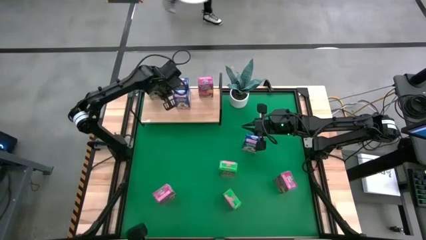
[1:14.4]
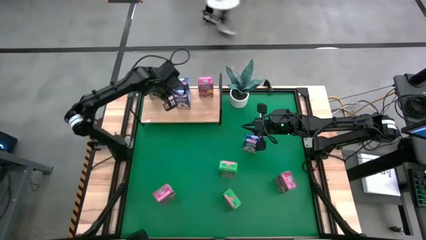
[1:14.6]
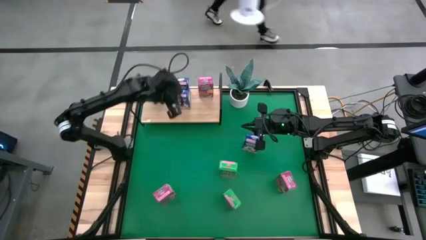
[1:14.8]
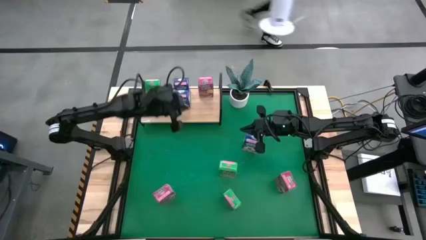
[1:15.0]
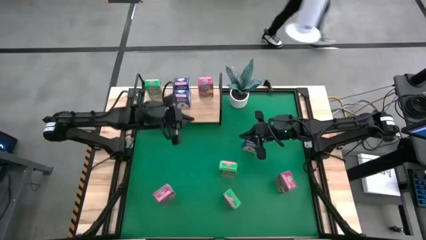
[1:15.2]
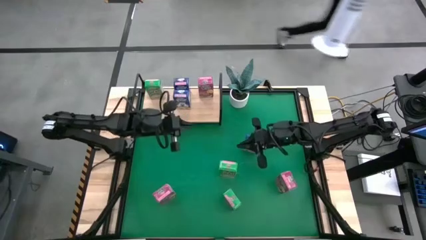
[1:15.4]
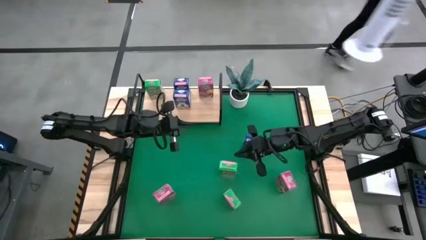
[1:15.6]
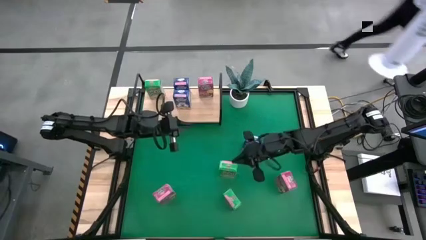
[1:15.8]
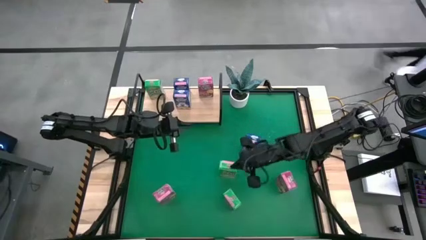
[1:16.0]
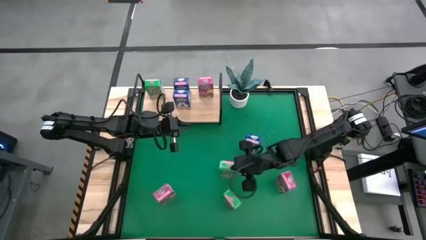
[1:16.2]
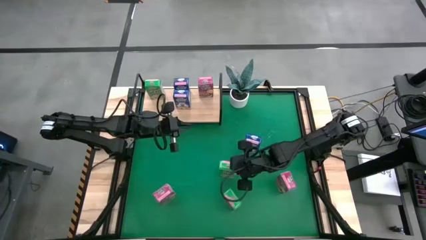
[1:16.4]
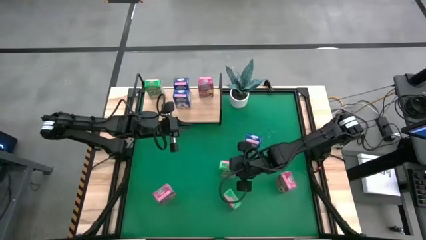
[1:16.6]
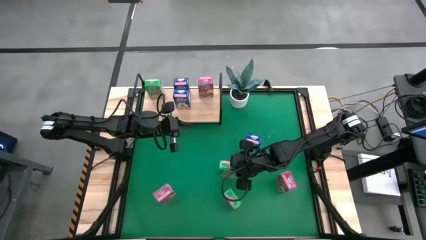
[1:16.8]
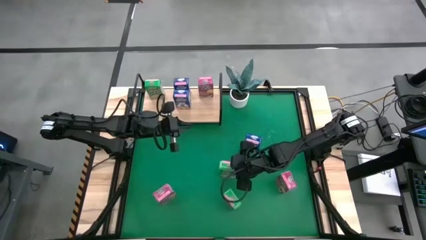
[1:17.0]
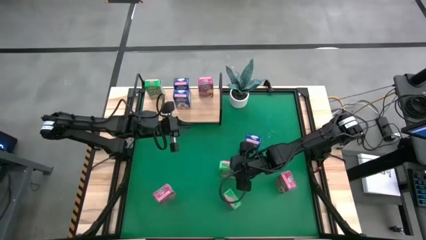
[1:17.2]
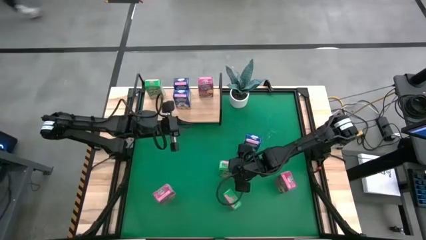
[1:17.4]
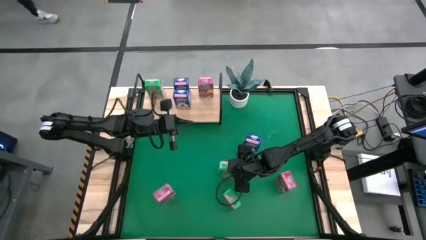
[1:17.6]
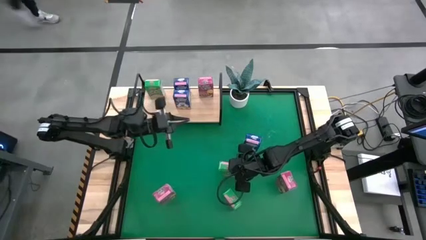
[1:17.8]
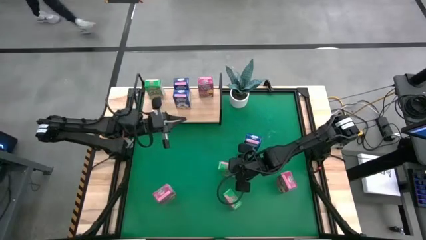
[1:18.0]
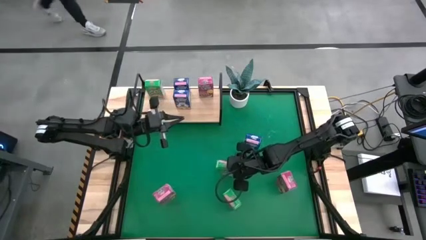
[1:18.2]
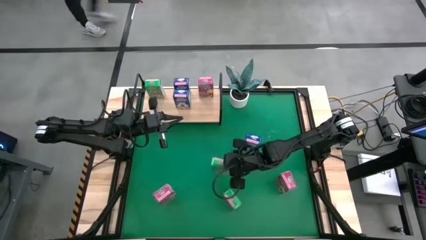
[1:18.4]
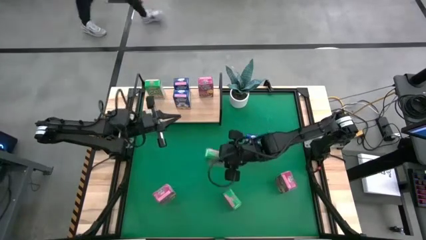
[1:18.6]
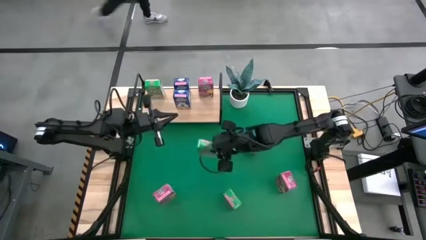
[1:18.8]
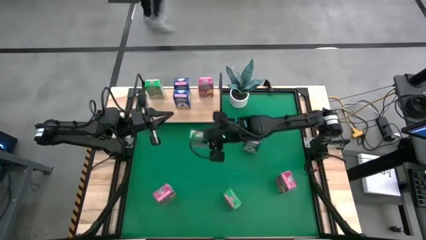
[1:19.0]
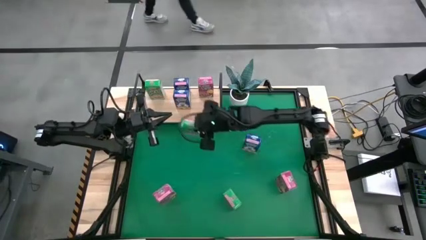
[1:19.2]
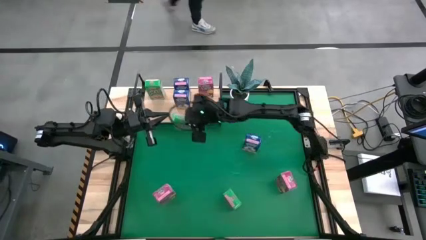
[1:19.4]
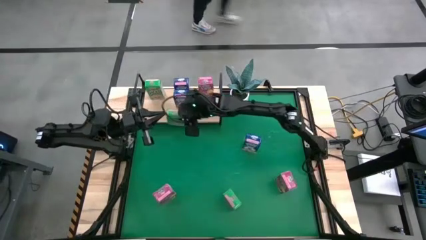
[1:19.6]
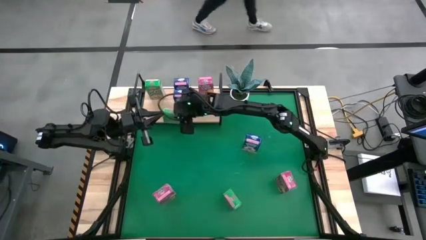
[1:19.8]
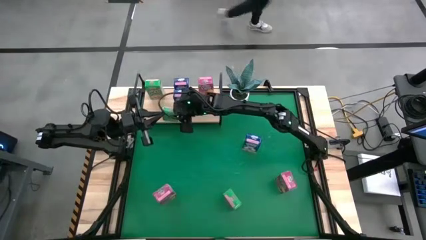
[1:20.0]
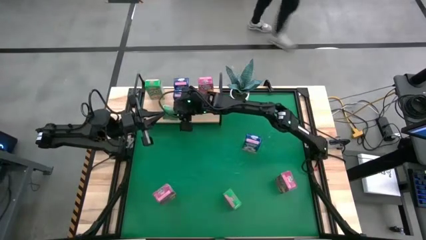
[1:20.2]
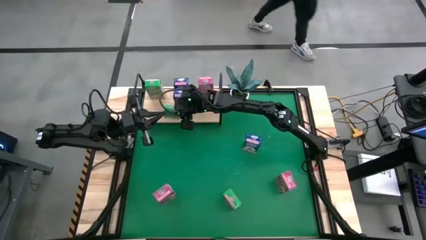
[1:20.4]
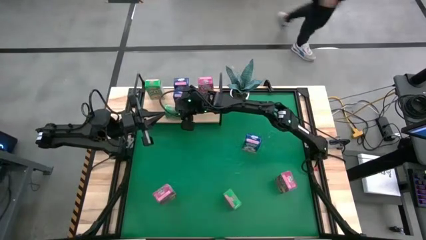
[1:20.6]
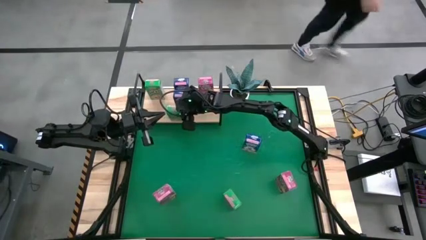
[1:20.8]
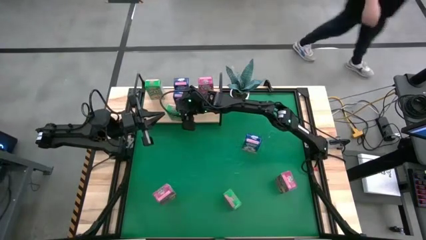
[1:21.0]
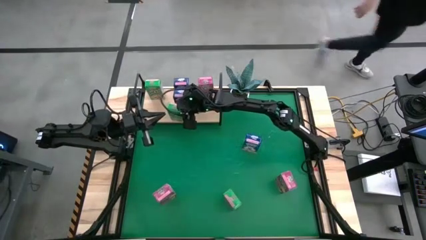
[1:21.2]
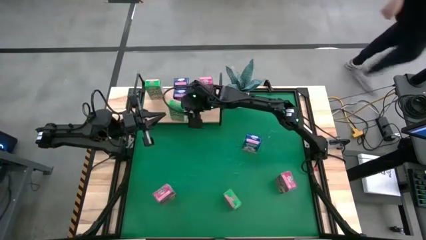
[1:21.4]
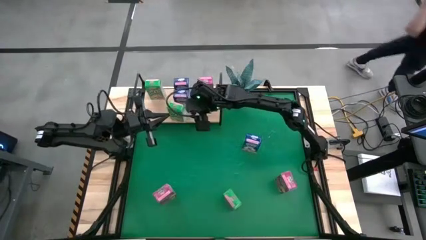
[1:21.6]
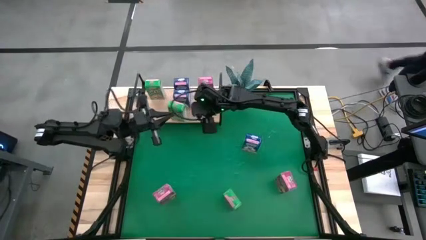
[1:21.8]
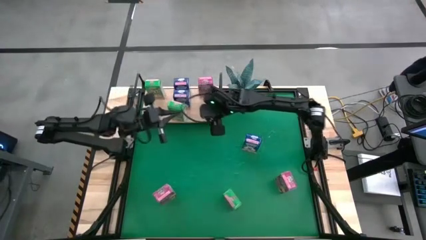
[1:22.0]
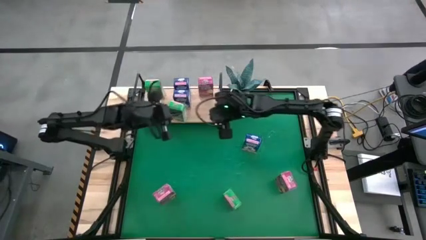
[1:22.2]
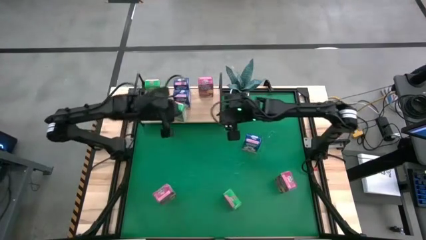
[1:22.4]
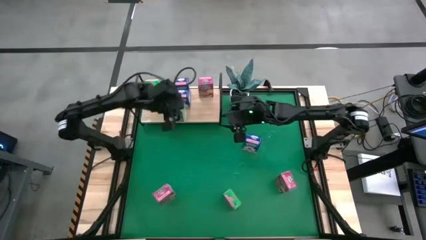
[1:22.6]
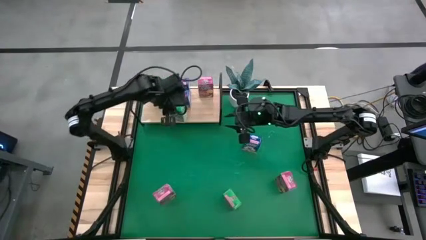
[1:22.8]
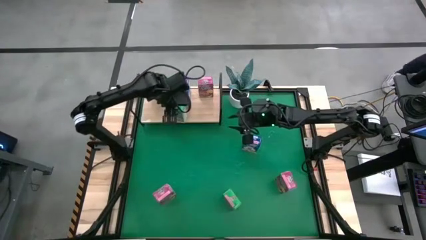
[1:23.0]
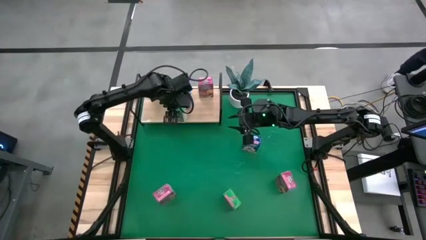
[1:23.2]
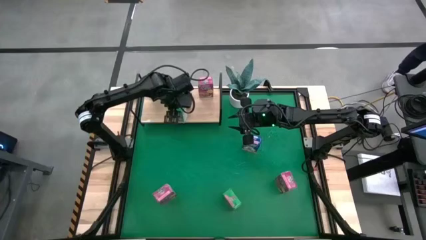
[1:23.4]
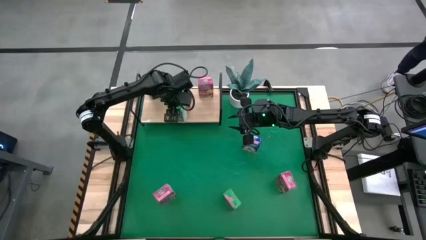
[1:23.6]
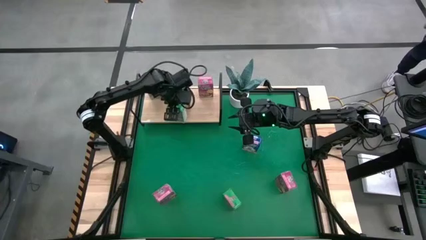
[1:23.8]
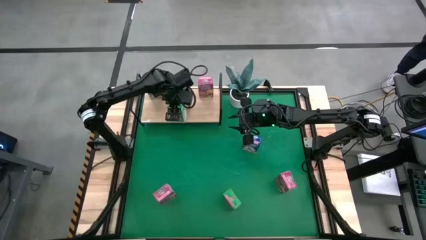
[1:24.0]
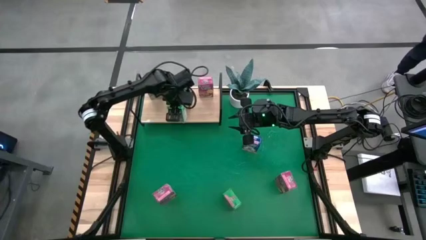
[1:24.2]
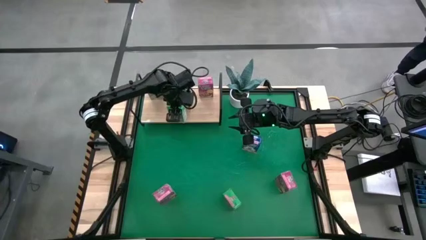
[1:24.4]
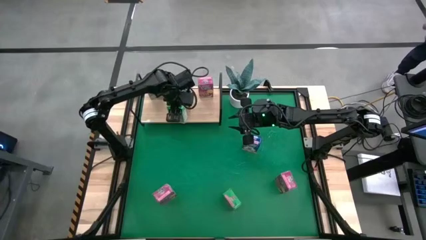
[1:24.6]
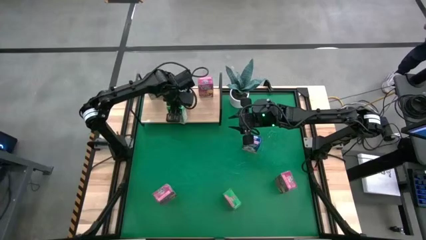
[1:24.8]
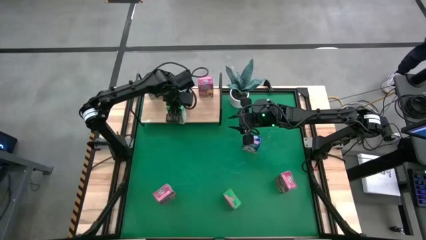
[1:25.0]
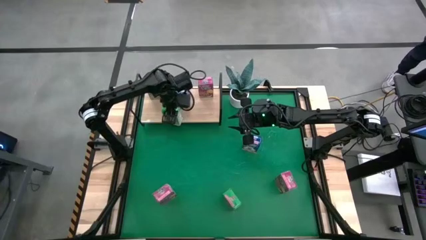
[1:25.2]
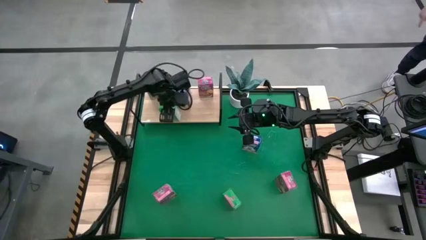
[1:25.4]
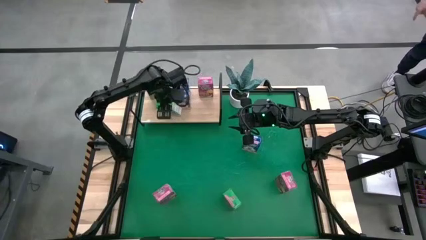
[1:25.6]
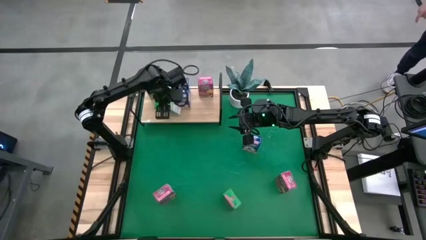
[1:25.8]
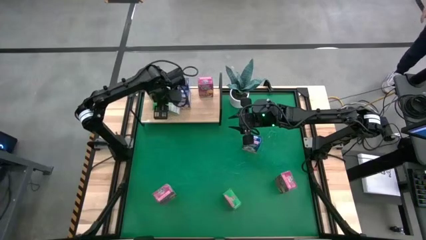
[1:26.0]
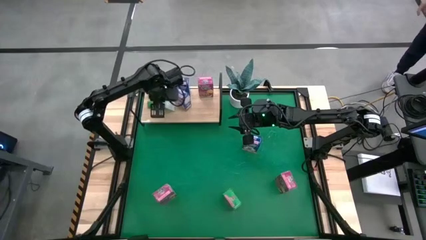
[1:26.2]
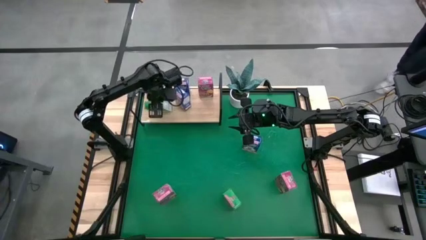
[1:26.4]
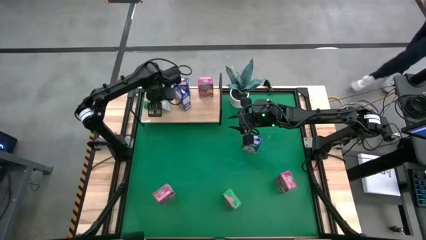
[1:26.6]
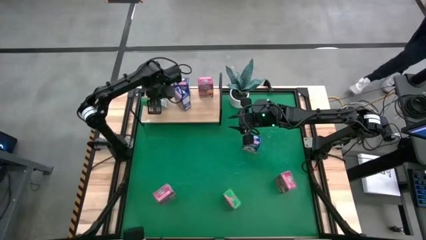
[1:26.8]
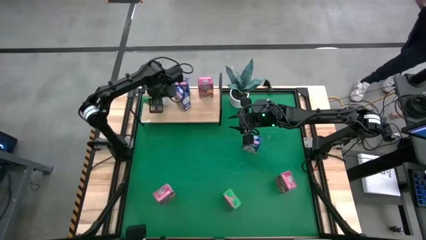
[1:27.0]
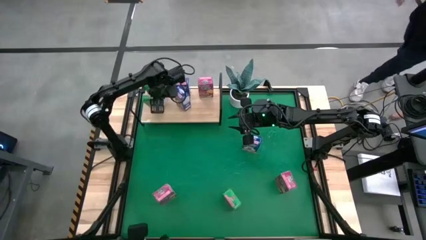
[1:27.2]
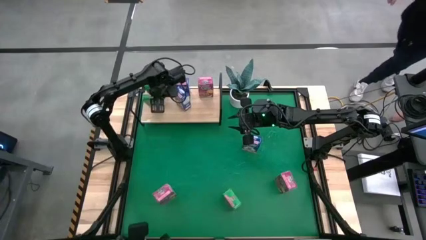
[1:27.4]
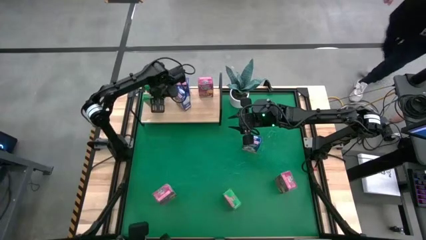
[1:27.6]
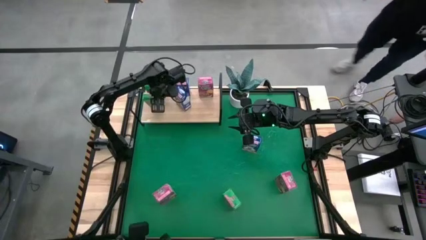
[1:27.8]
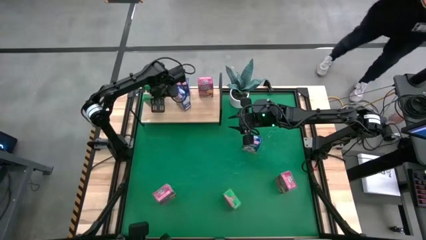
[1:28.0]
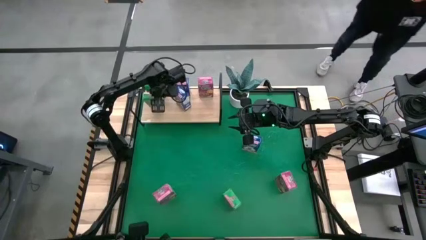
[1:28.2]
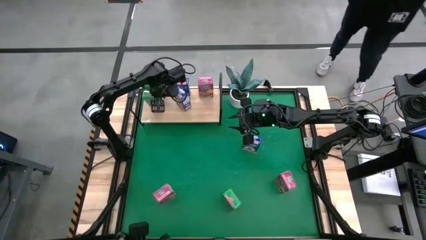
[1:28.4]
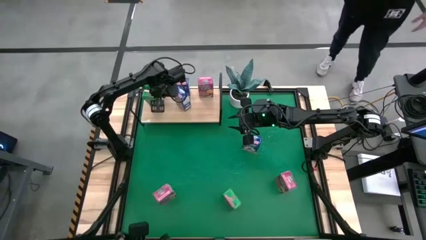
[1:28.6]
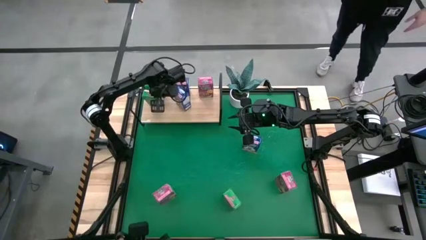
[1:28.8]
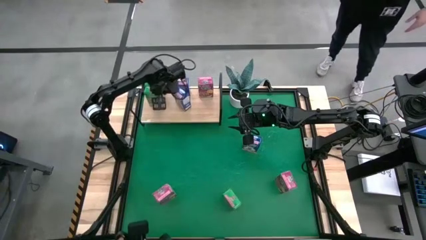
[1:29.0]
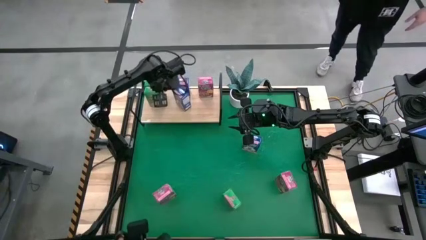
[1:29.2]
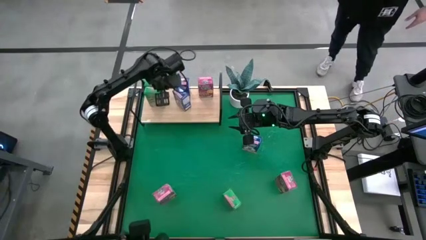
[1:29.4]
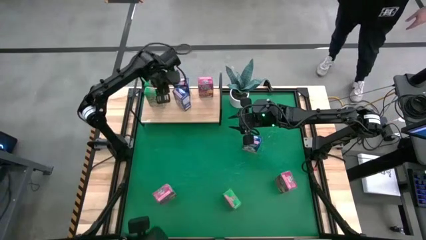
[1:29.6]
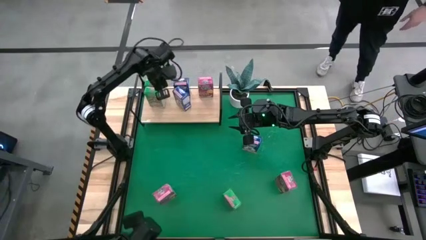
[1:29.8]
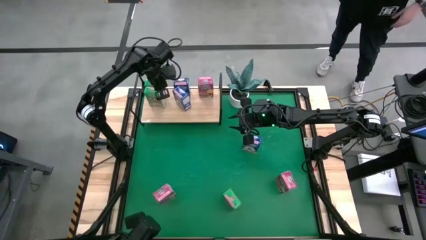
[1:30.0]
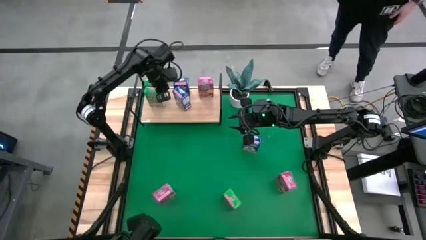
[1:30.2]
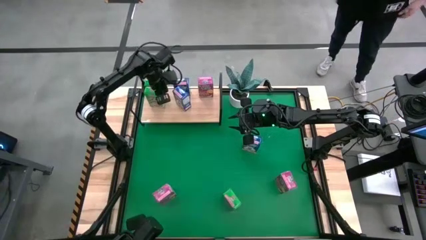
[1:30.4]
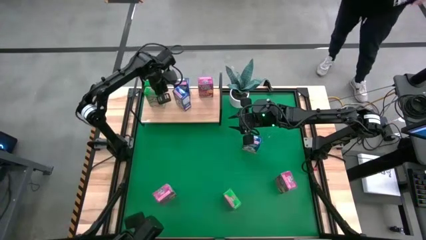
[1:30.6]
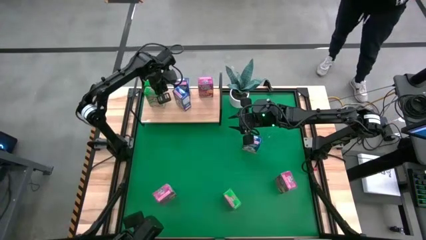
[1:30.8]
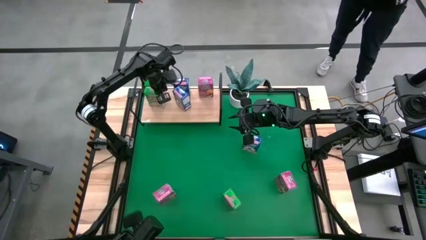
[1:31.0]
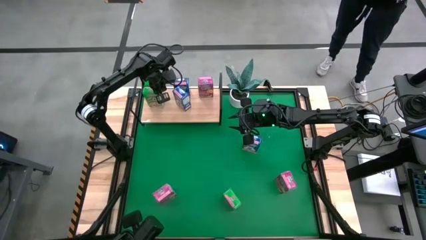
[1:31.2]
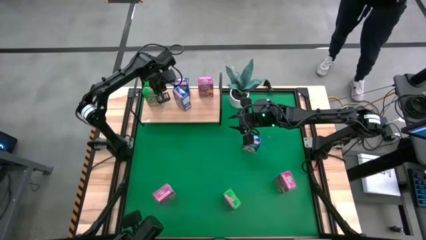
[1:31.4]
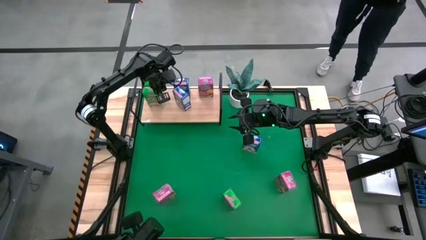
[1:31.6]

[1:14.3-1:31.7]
Task: Stack cereal on shelf
Put the top green cereal box on the shelf aligned with the other green cereal box
